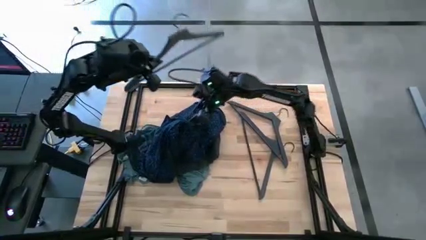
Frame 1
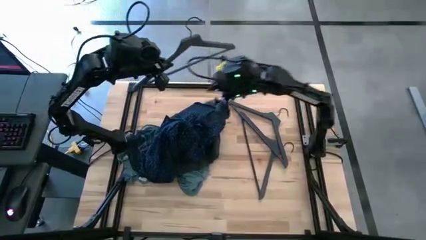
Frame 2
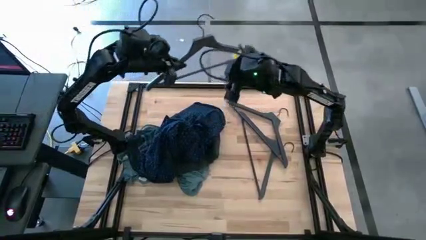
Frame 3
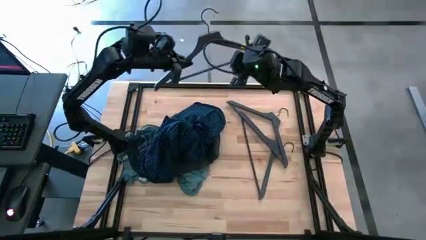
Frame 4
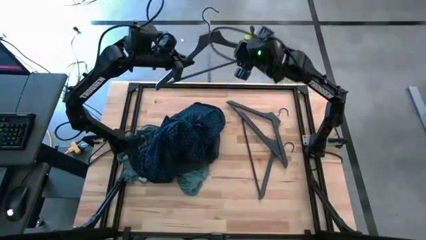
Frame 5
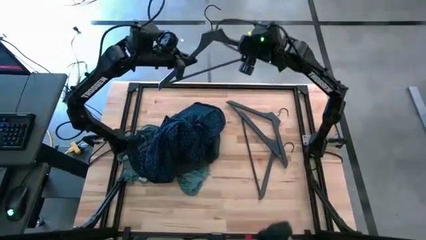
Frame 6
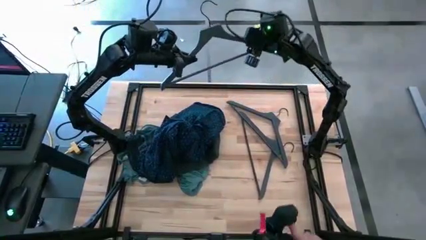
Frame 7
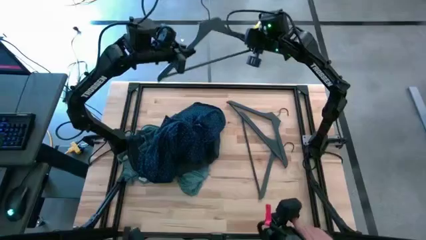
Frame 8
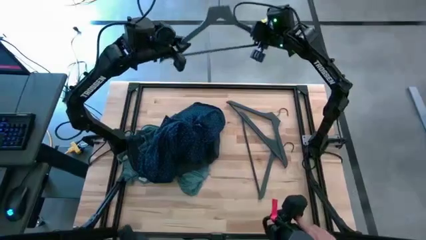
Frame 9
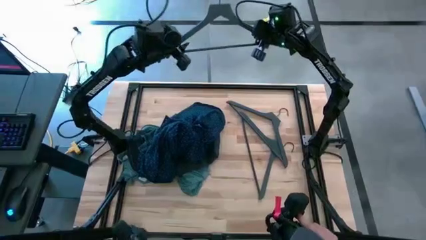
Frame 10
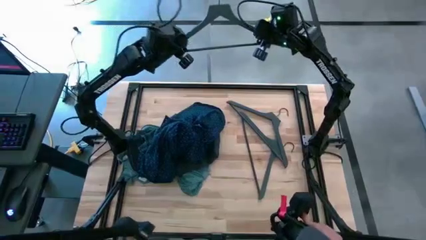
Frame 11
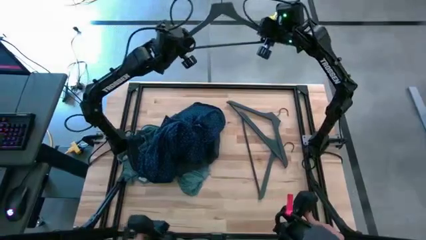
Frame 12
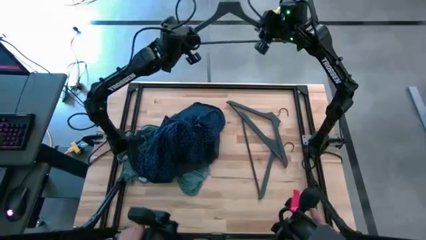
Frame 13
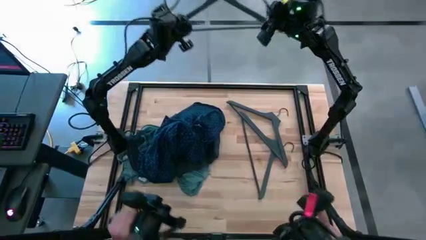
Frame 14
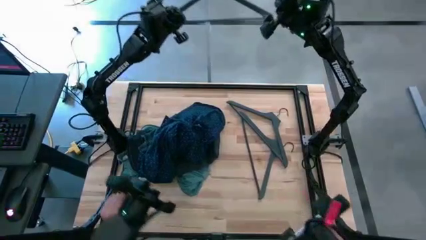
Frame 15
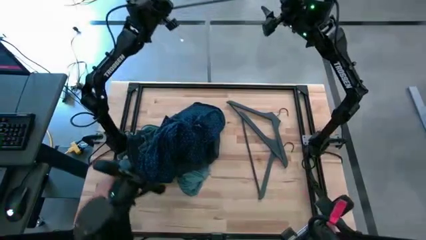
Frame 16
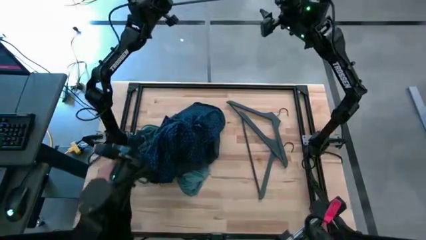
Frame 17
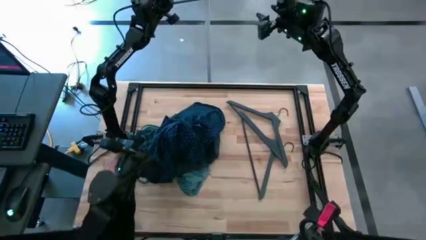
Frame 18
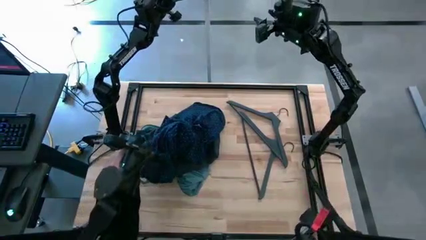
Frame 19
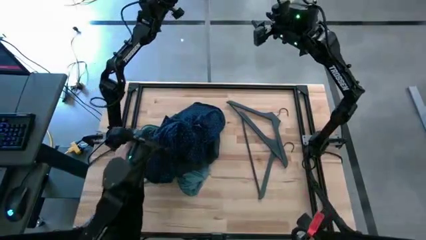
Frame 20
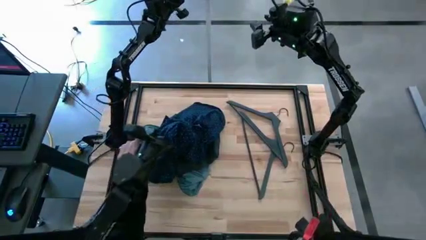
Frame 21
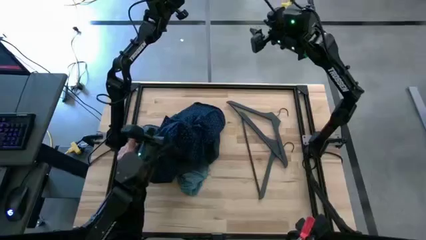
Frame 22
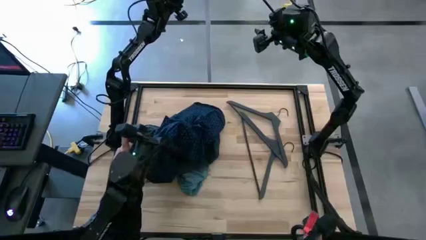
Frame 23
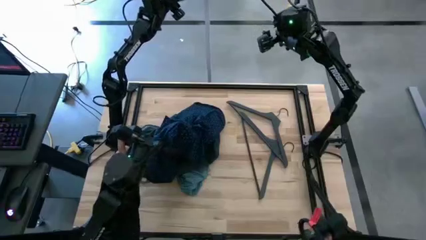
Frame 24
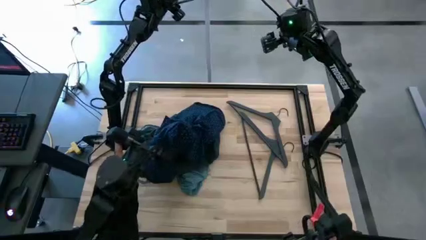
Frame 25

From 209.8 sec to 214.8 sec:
Task: Hang clothes
Hang the hanger on the hanger rack

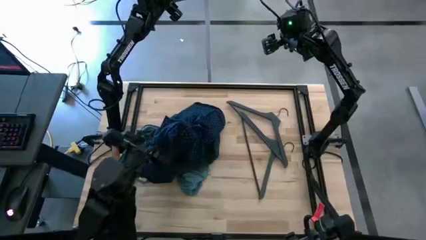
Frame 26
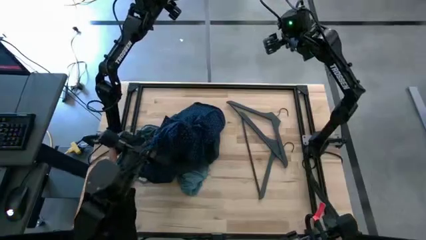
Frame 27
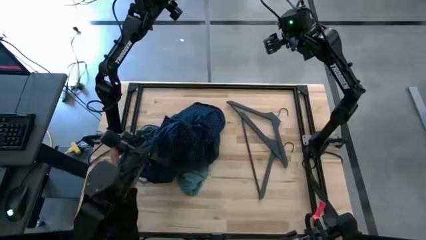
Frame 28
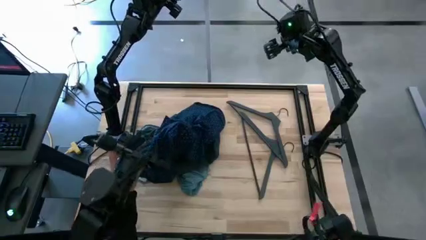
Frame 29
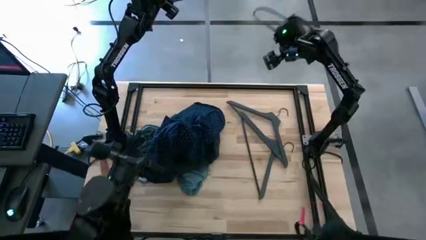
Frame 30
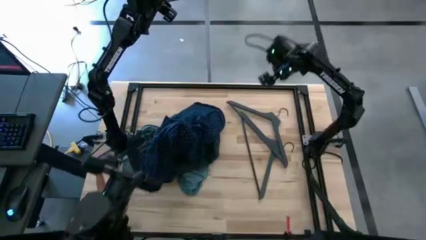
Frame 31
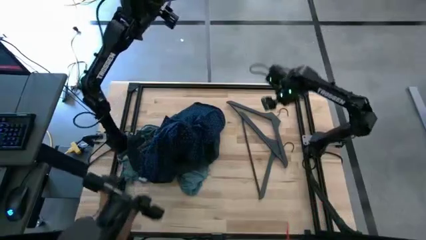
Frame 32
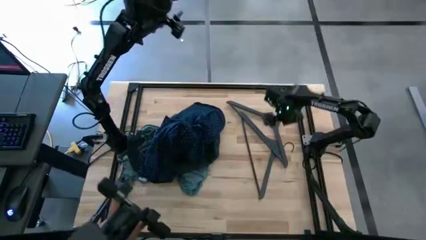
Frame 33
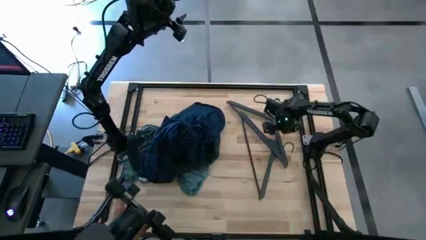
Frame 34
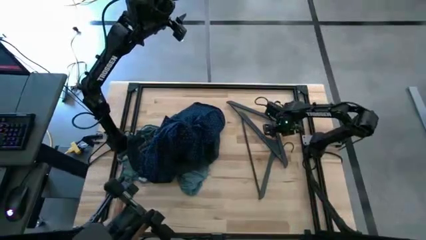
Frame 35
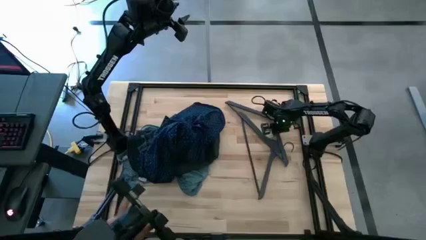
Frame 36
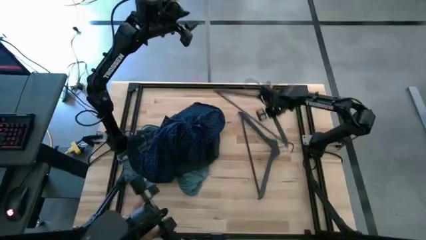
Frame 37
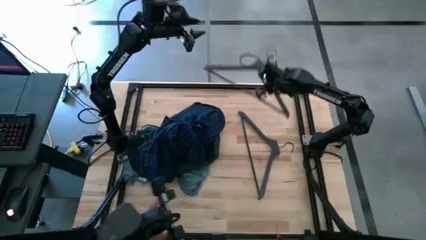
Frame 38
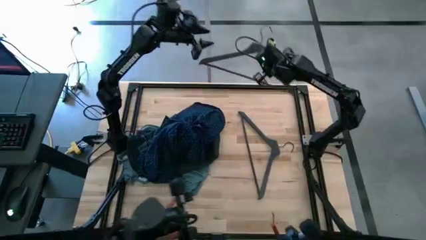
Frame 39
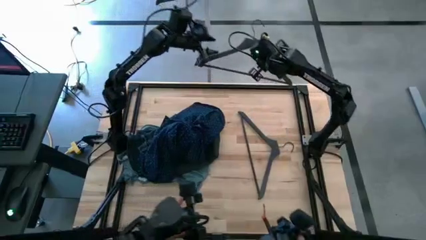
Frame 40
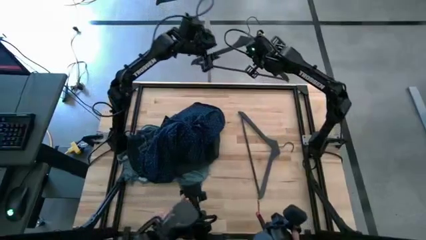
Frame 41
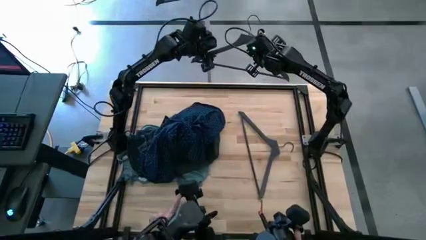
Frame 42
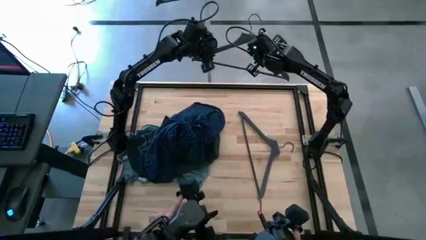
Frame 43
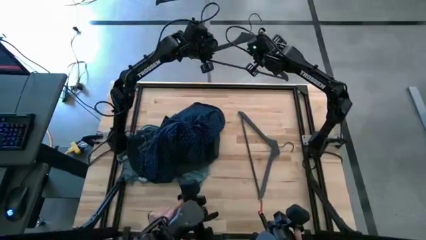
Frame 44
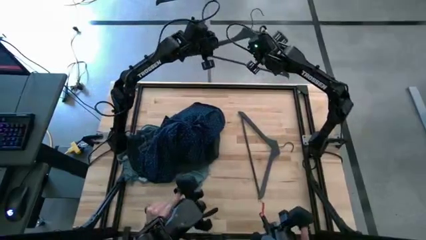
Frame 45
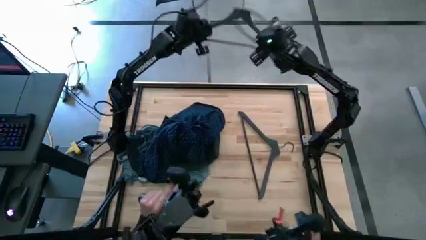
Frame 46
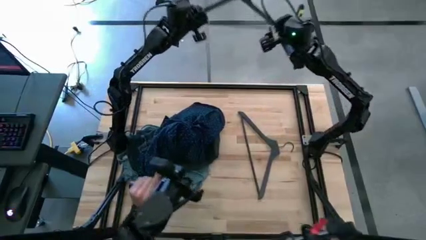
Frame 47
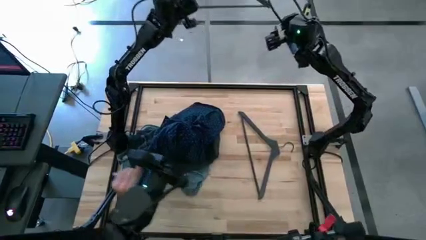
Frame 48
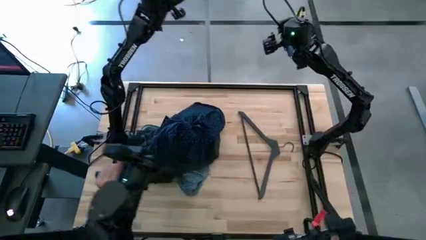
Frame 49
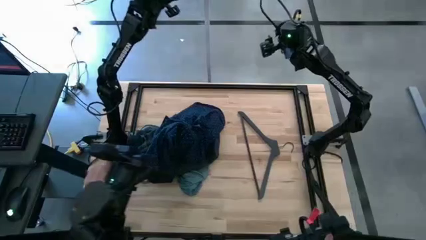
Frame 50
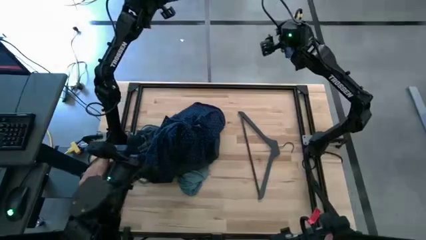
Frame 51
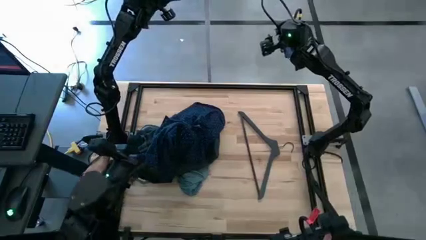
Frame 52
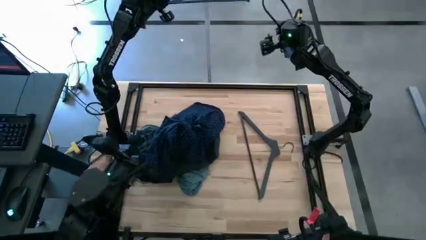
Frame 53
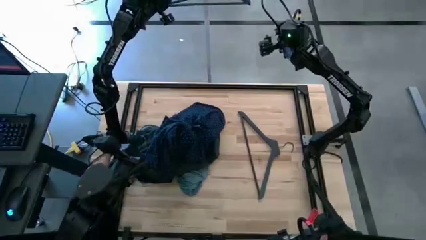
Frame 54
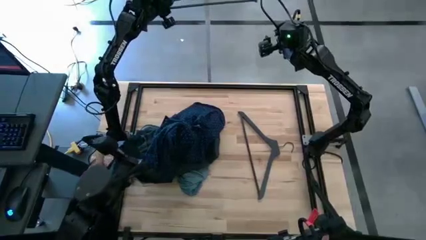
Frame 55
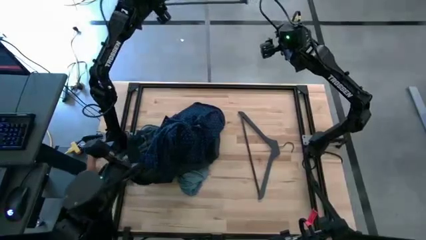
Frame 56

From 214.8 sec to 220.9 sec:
Hang the hanger on the hanger rack

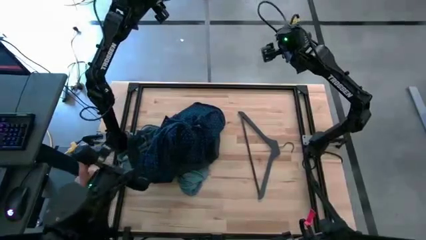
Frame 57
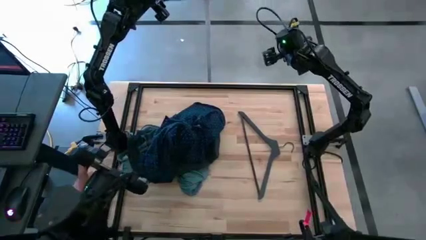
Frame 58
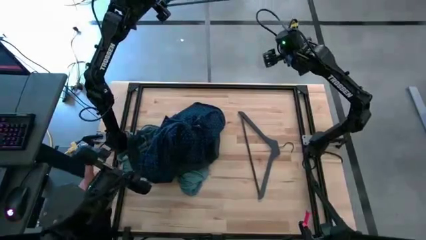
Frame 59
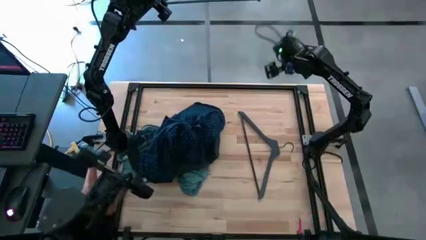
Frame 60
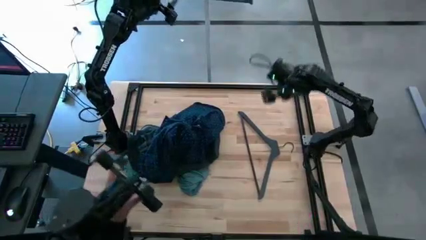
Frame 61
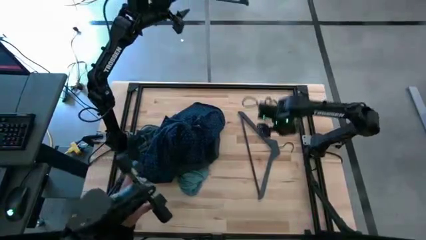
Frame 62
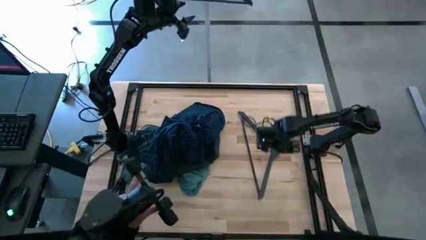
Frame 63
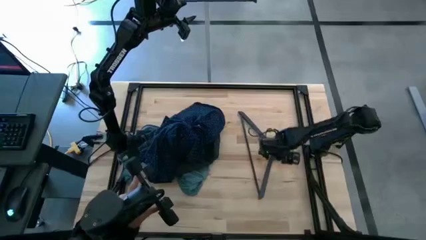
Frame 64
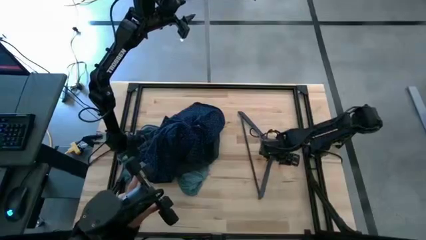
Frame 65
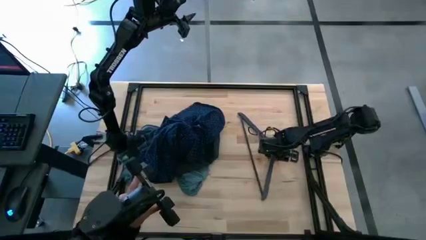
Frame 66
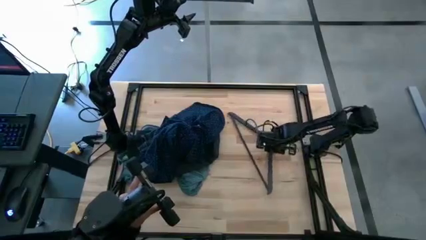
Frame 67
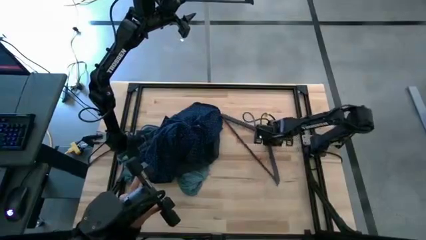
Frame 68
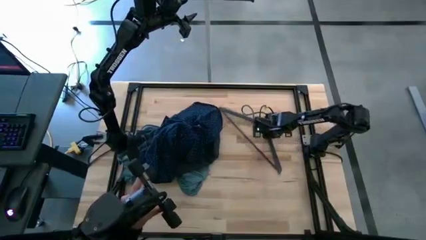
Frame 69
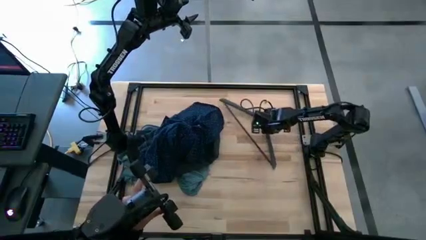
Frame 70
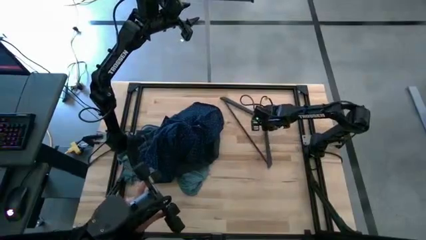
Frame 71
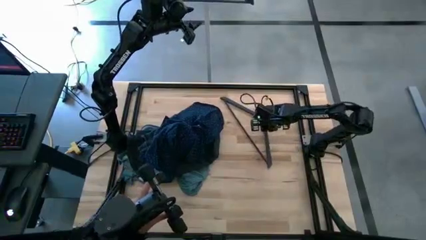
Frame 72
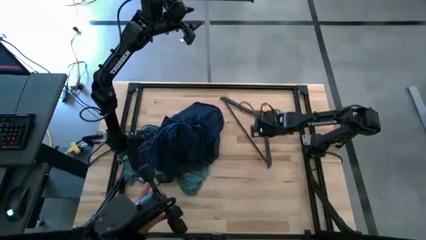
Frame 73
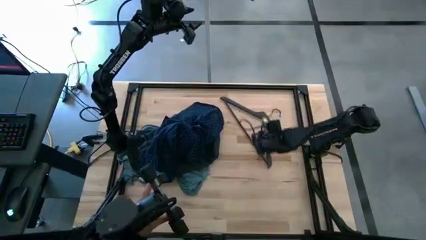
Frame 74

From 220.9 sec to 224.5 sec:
Hang the hanger on the hanger rack
